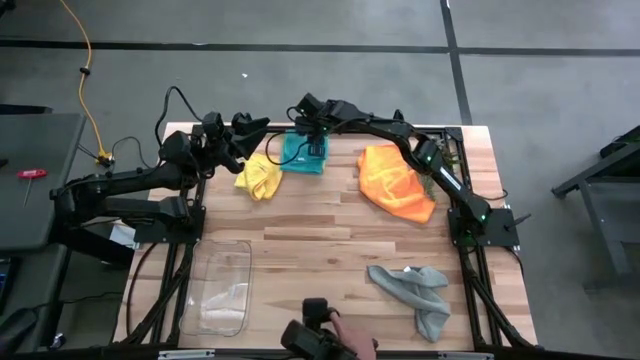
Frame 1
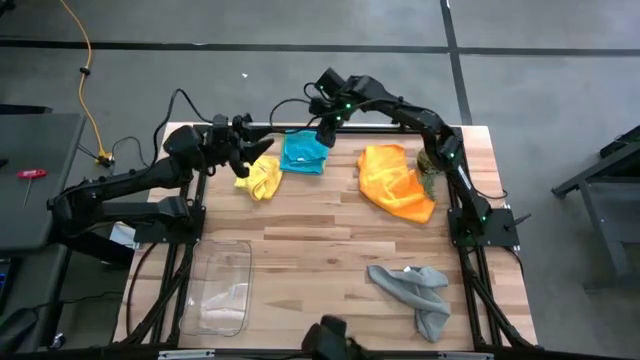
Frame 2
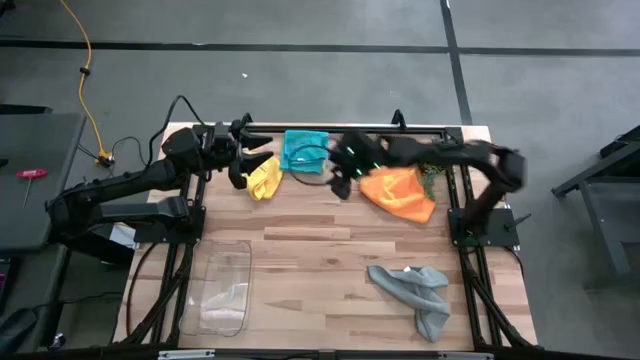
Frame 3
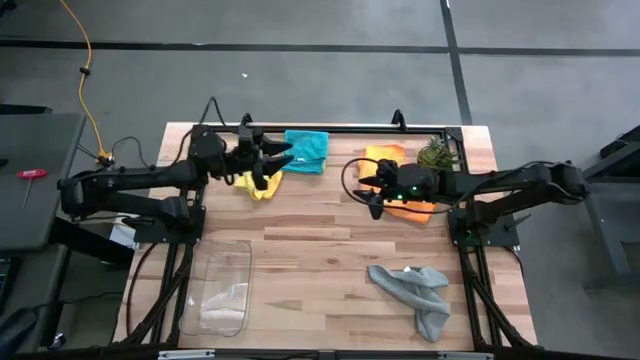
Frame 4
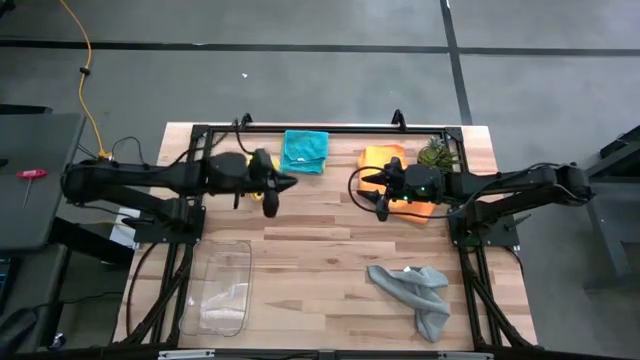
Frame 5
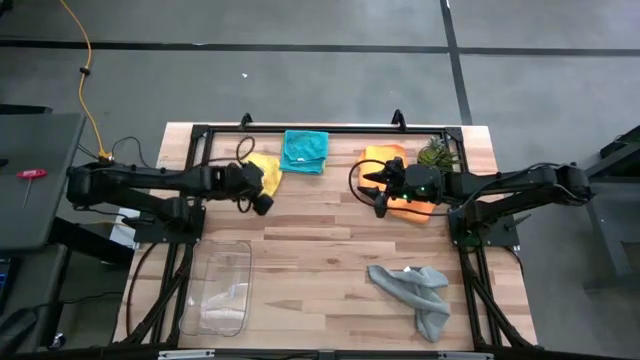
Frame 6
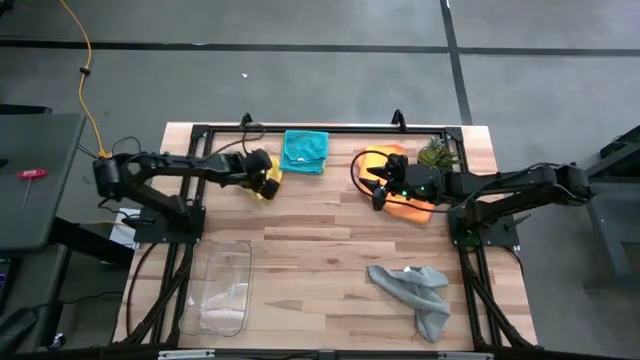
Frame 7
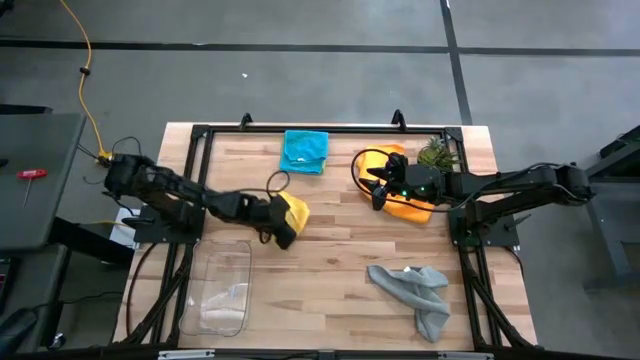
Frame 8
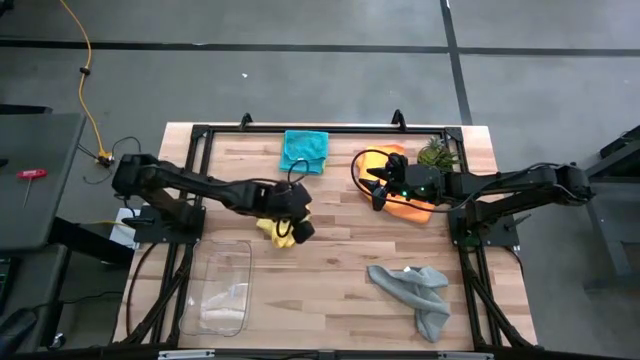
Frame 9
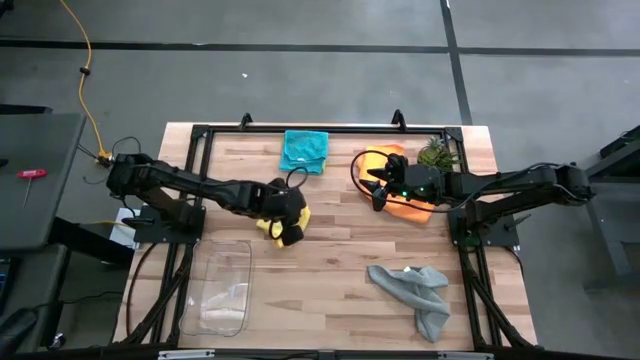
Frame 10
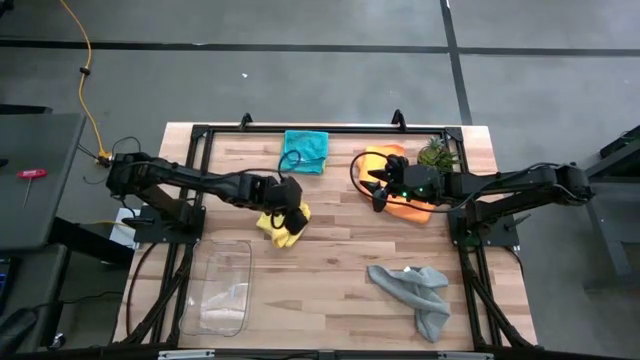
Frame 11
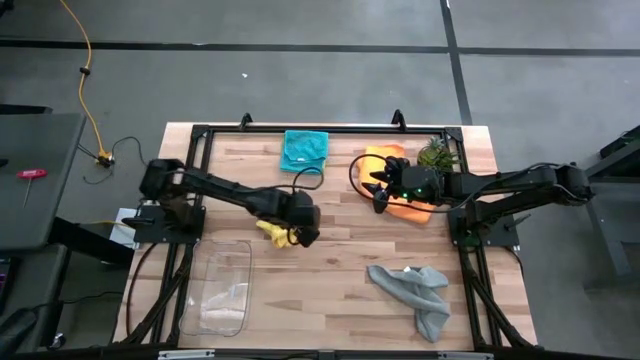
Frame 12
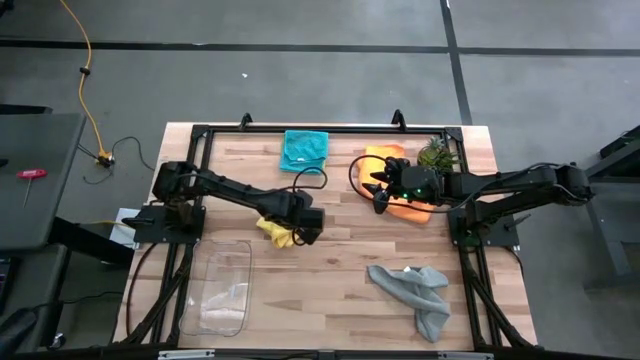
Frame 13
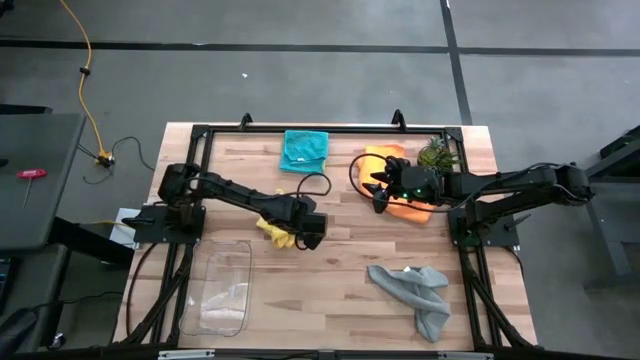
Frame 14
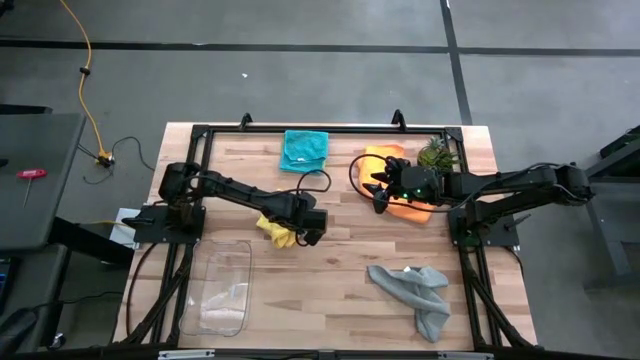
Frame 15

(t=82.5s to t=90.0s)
Task: Fold microfiber towels
Fold the yellow microfiber towel

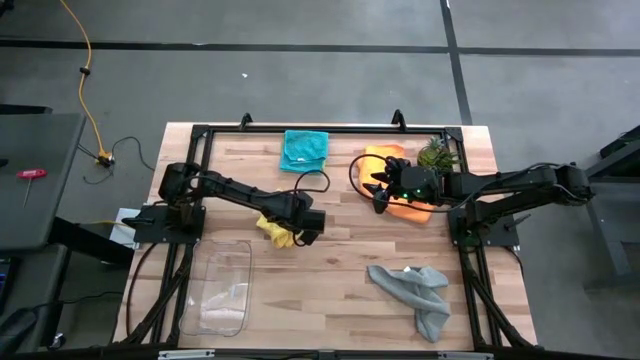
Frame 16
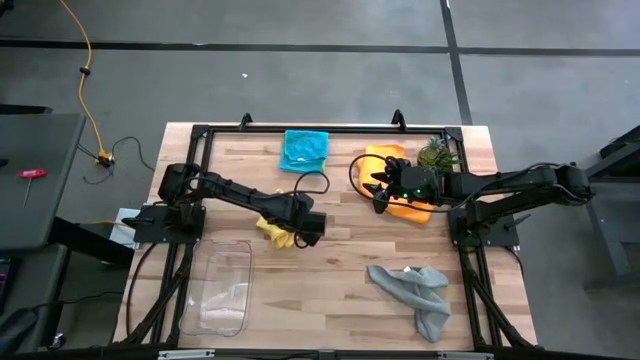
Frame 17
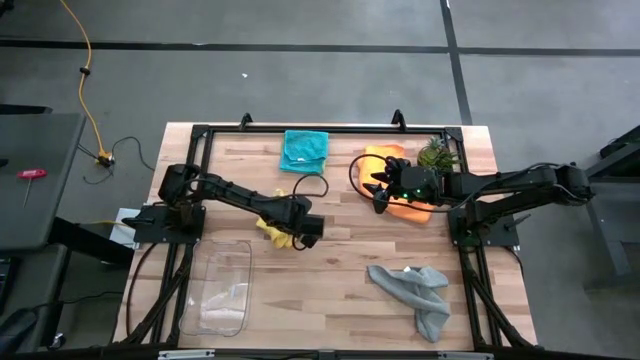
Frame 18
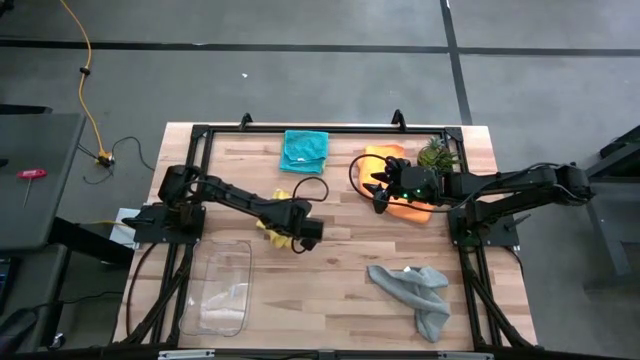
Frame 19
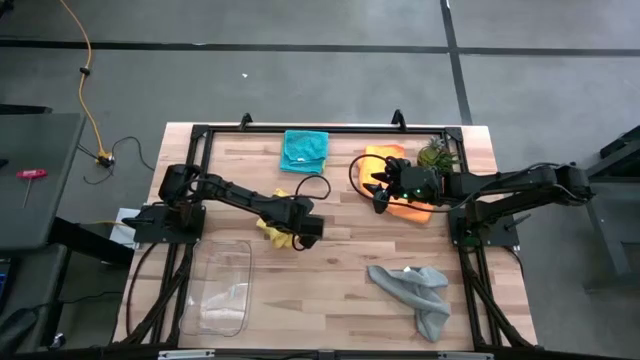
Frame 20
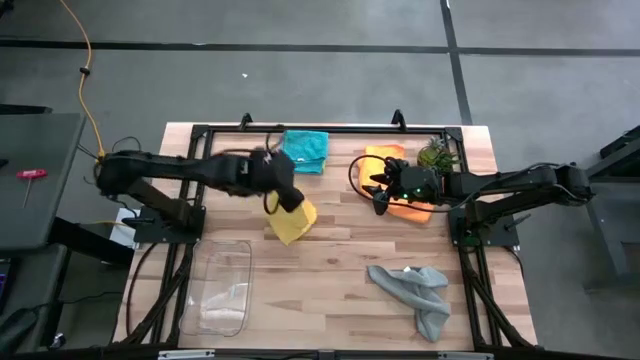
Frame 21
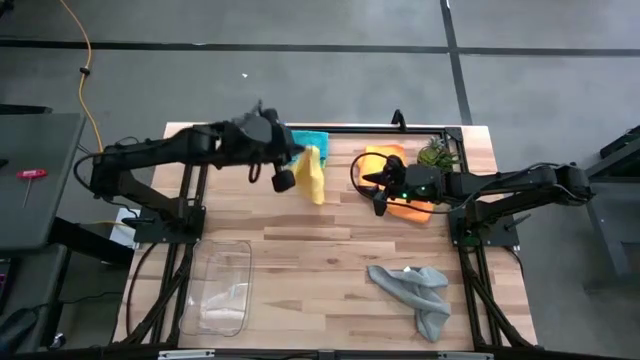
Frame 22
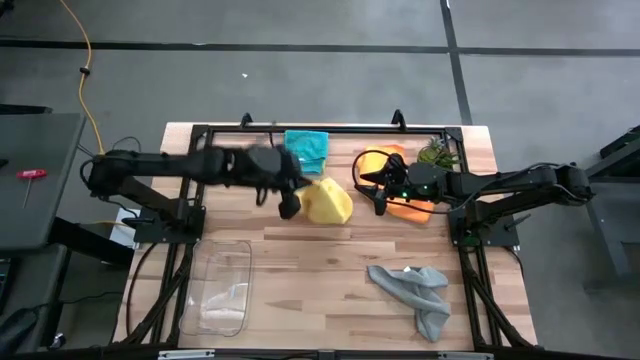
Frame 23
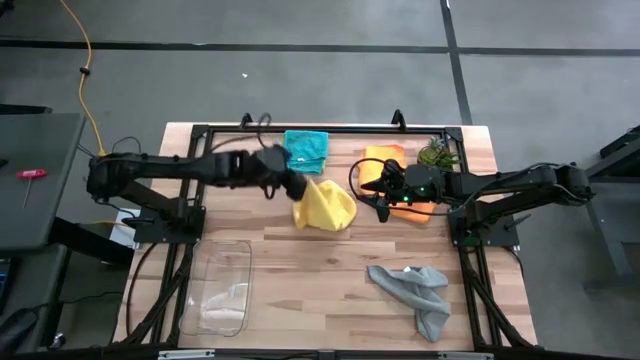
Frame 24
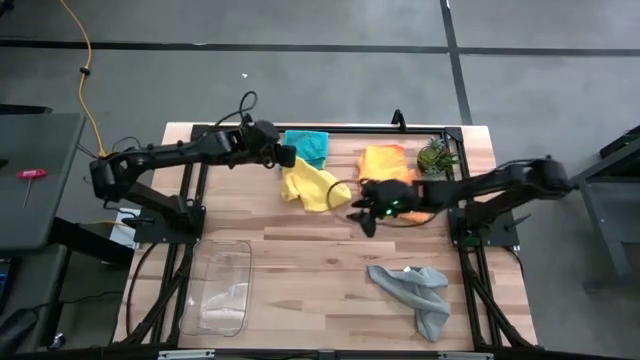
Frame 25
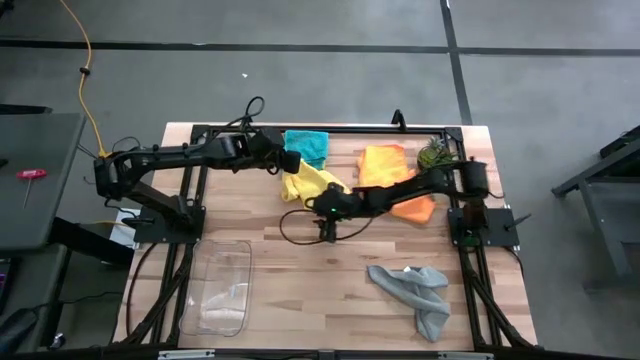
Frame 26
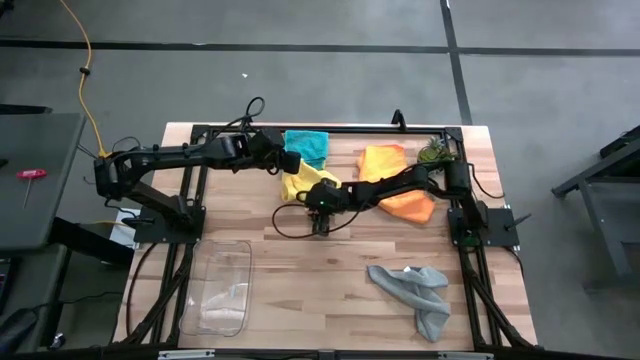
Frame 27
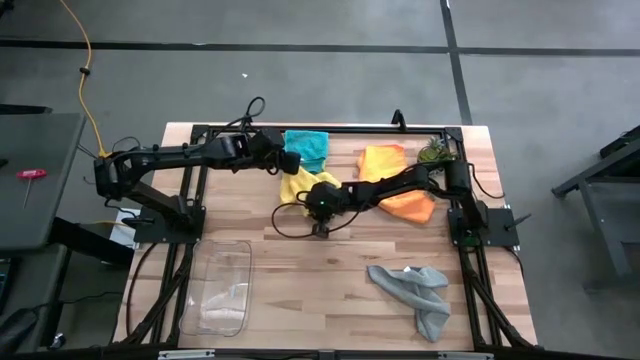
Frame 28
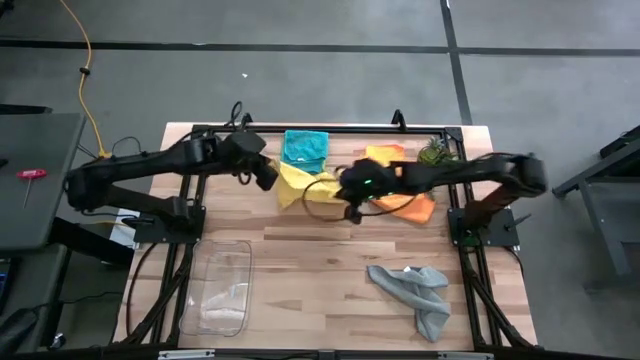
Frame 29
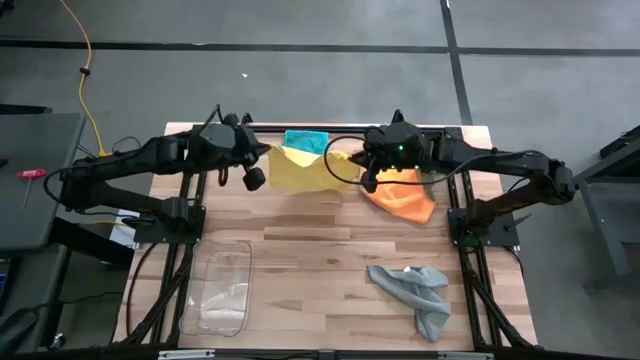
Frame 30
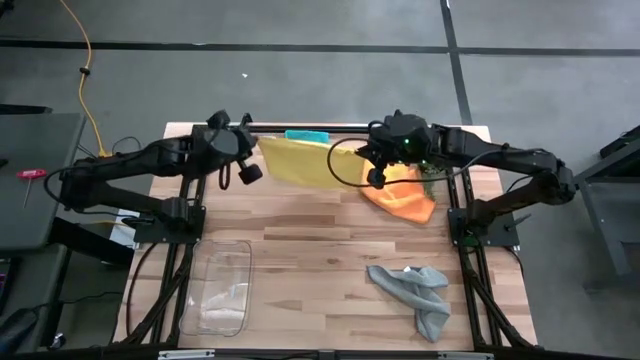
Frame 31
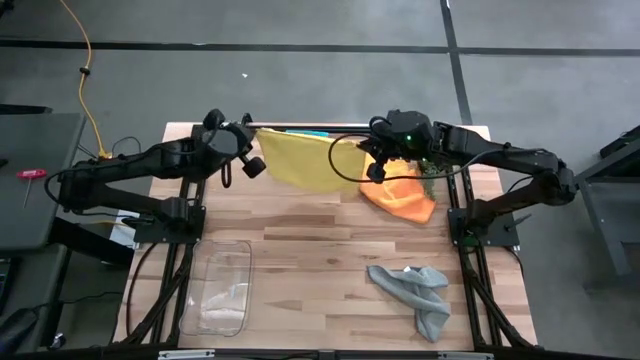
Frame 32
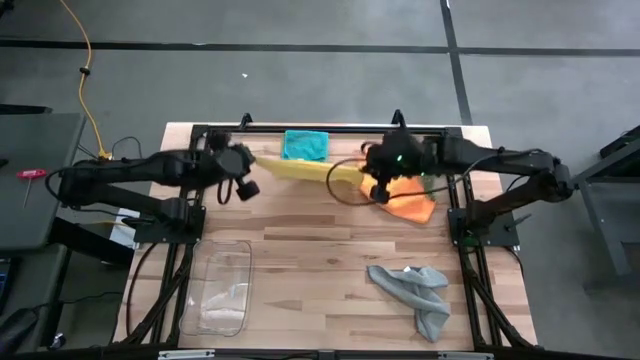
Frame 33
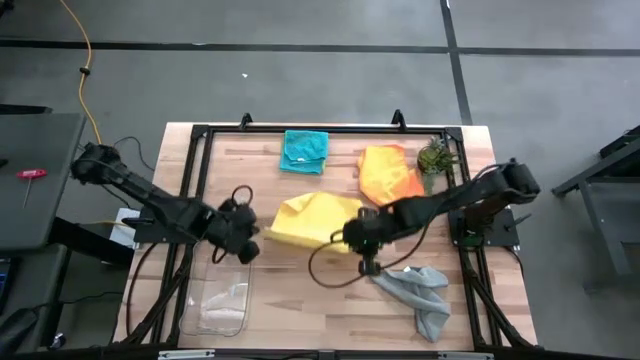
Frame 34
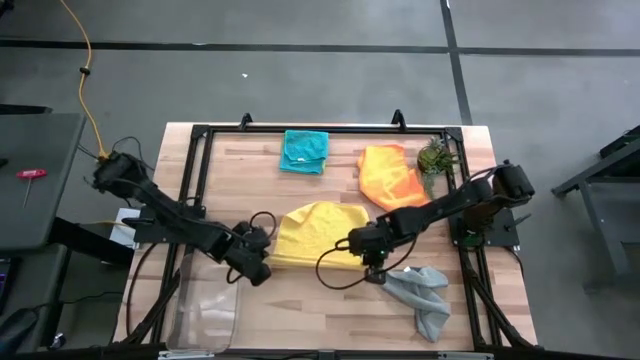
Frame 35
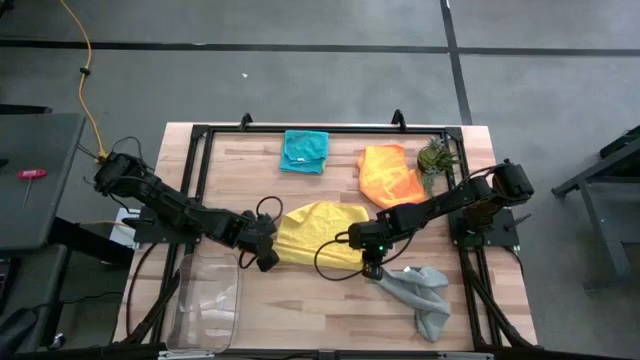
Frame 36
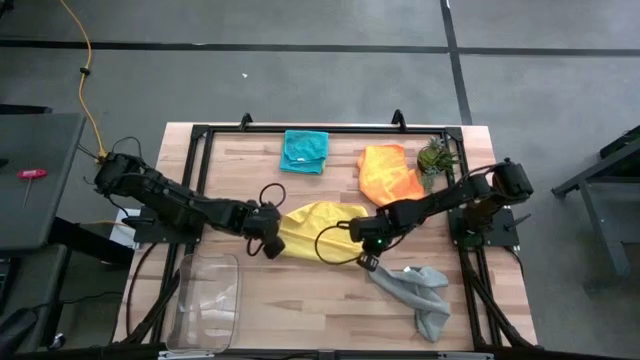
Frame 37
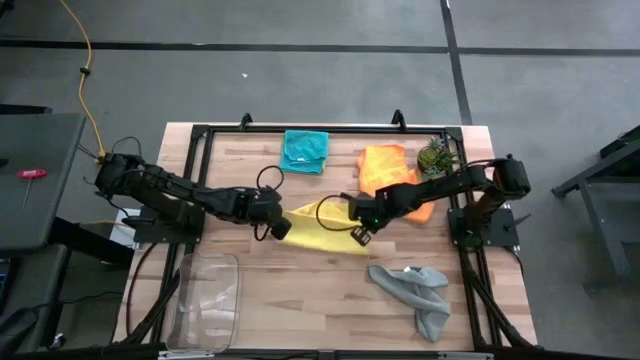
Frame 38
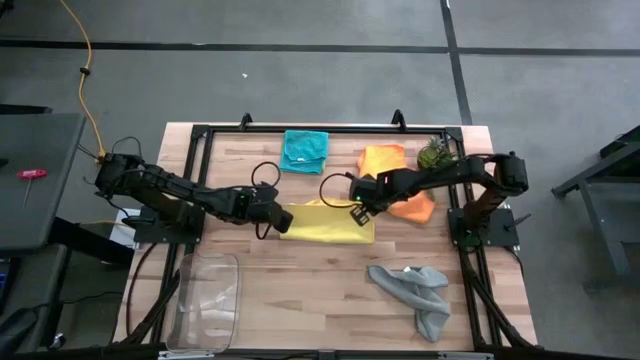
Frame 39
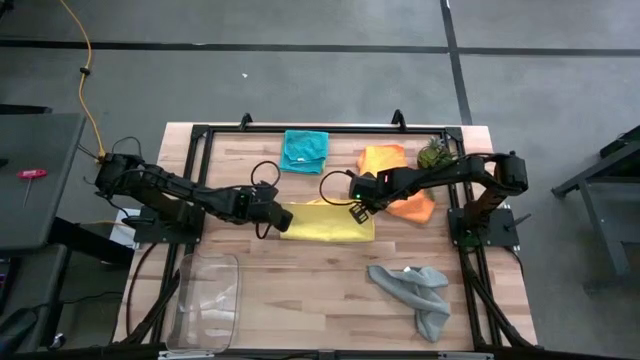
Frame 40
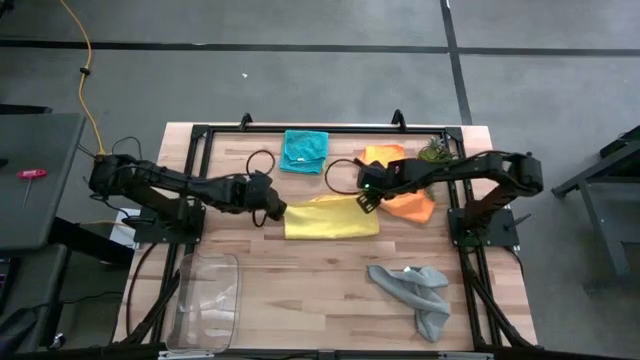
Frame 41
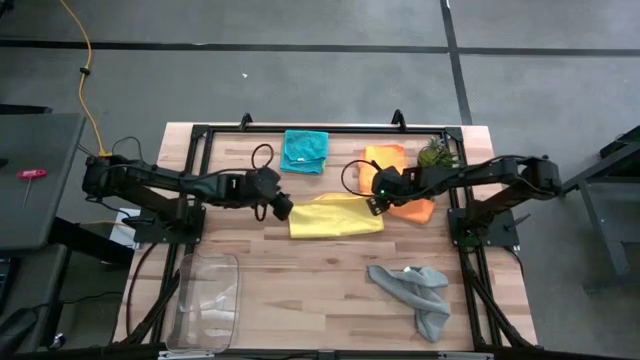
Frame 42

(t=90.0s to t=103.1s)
Fold the yellow microfiber towel
